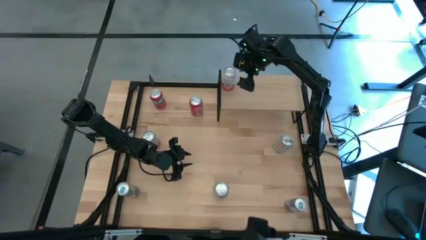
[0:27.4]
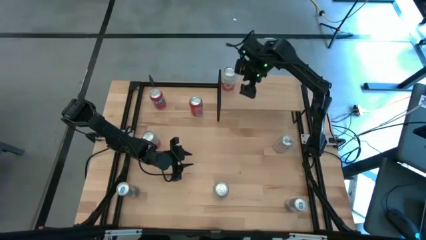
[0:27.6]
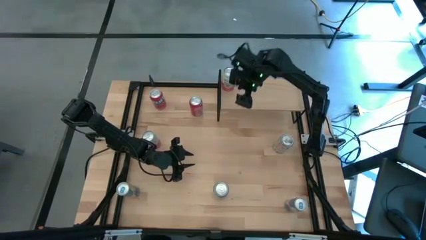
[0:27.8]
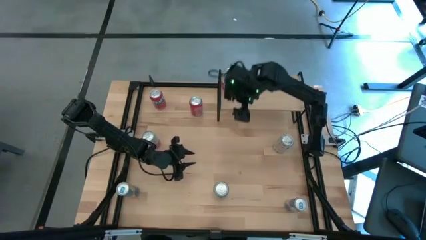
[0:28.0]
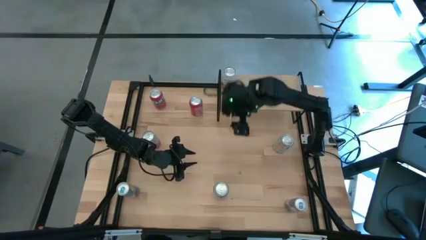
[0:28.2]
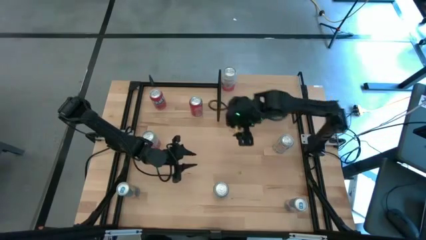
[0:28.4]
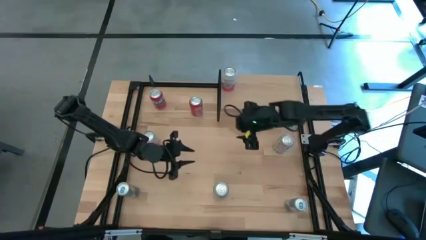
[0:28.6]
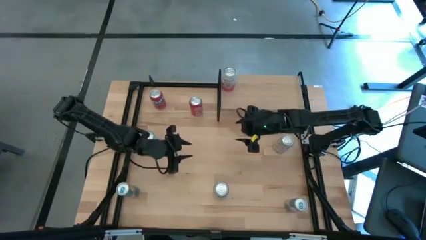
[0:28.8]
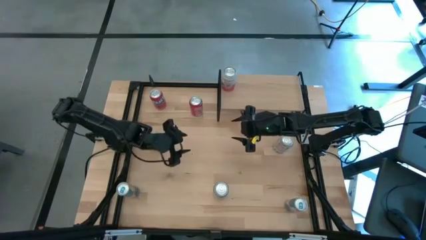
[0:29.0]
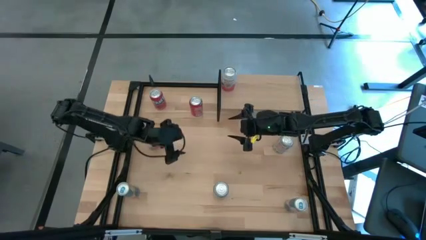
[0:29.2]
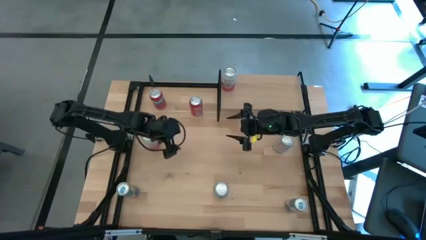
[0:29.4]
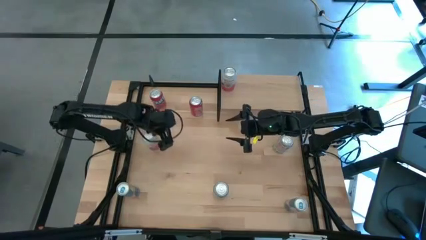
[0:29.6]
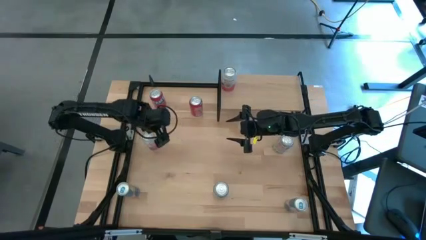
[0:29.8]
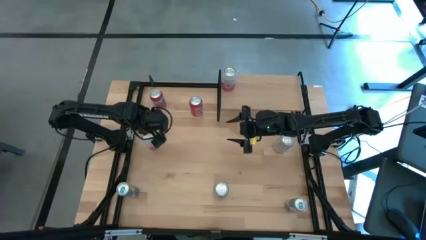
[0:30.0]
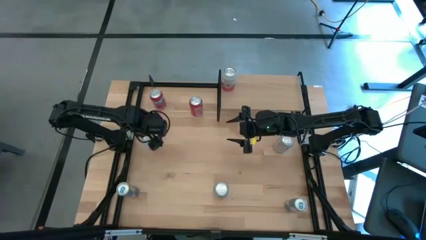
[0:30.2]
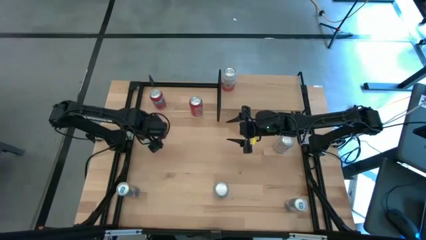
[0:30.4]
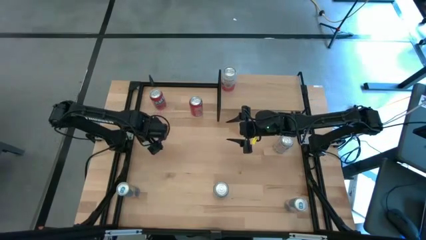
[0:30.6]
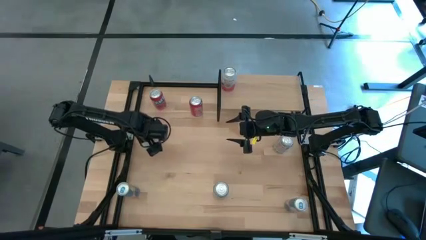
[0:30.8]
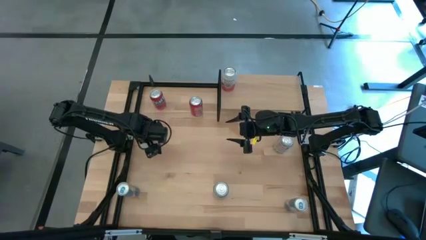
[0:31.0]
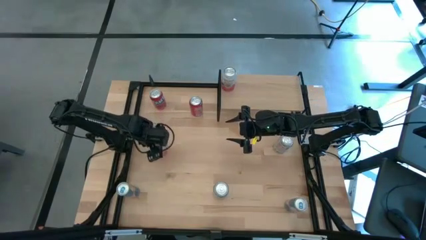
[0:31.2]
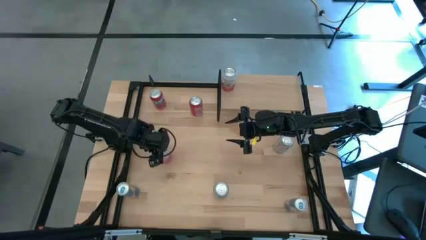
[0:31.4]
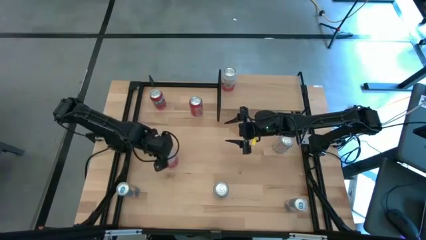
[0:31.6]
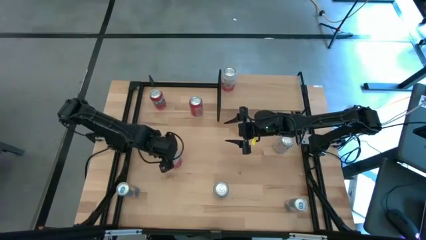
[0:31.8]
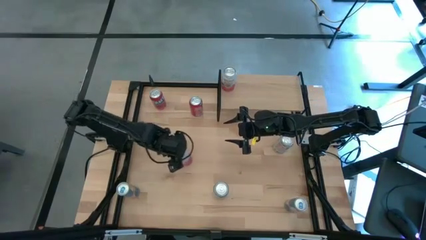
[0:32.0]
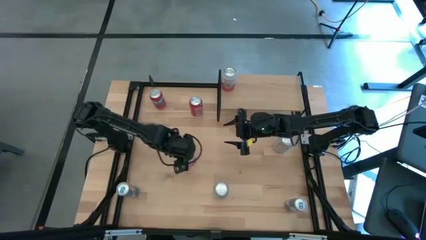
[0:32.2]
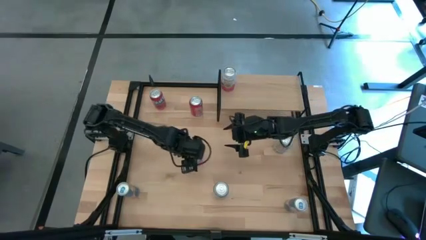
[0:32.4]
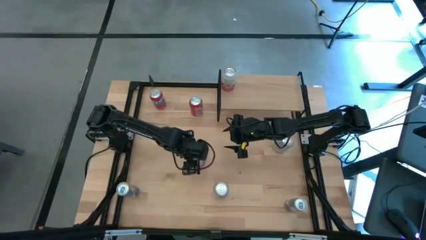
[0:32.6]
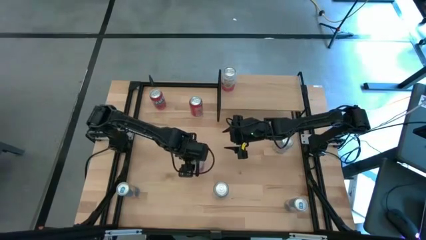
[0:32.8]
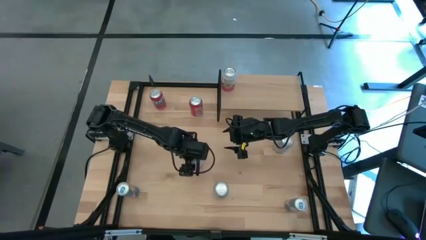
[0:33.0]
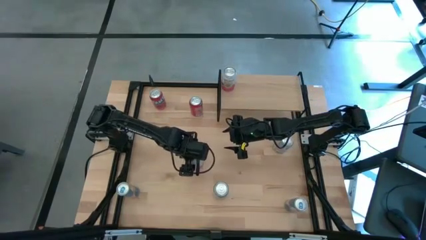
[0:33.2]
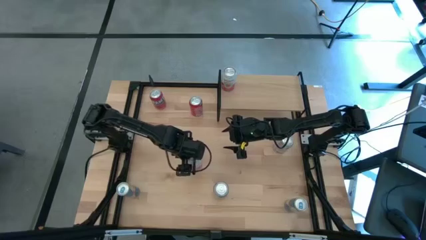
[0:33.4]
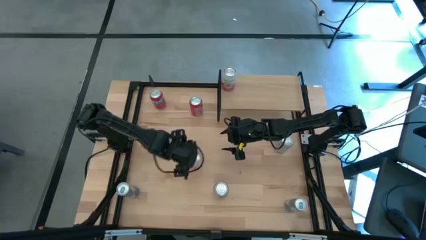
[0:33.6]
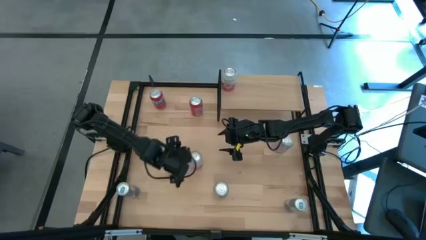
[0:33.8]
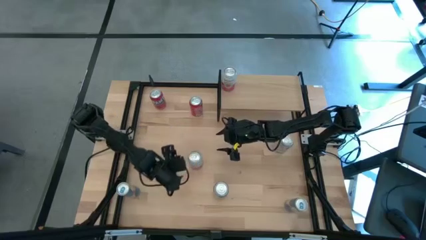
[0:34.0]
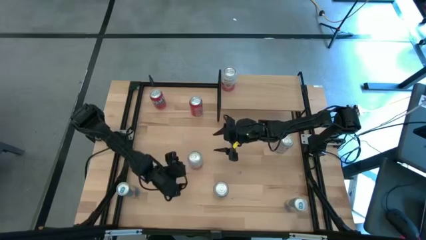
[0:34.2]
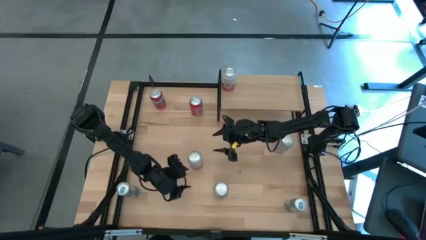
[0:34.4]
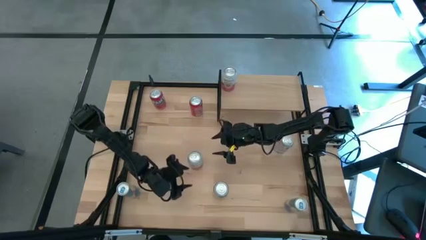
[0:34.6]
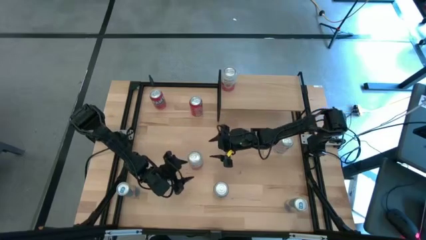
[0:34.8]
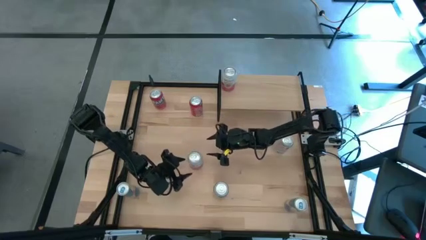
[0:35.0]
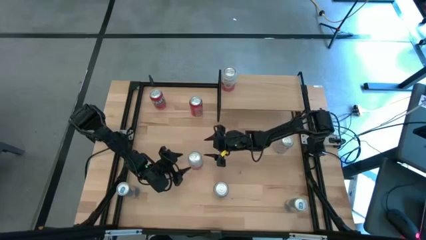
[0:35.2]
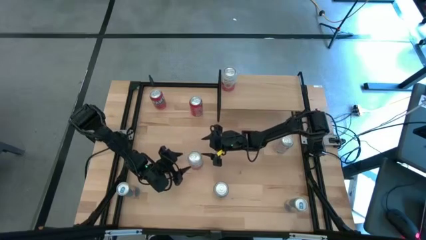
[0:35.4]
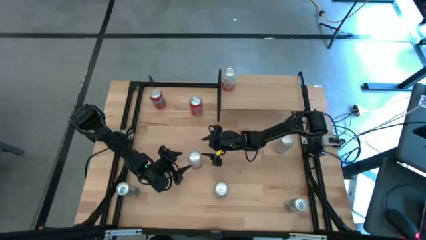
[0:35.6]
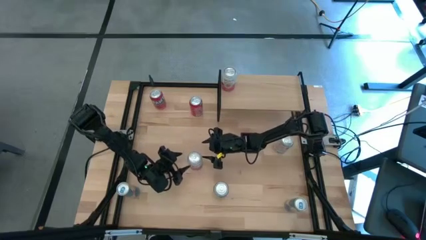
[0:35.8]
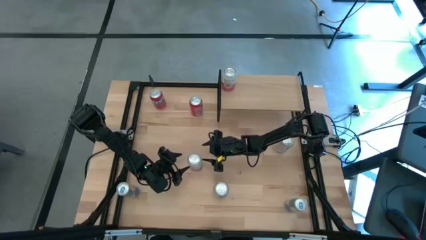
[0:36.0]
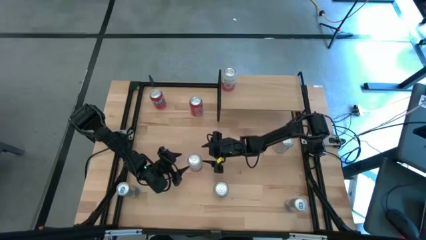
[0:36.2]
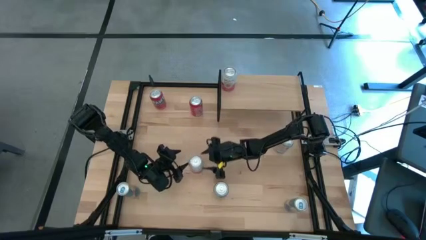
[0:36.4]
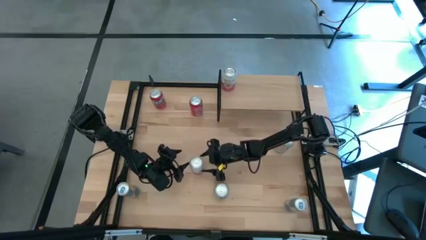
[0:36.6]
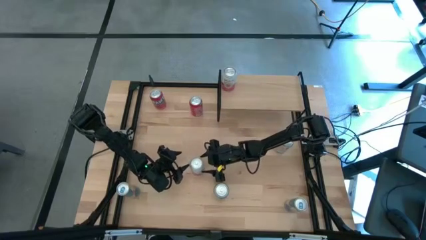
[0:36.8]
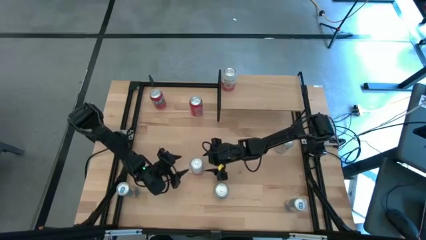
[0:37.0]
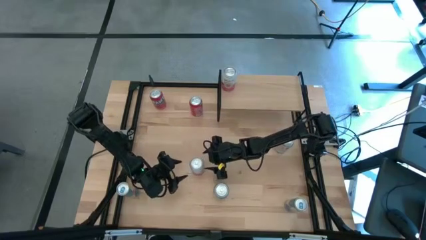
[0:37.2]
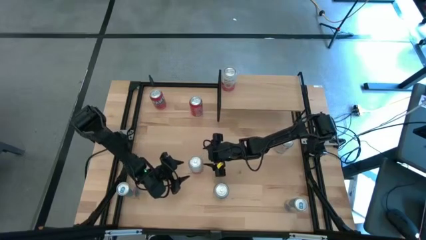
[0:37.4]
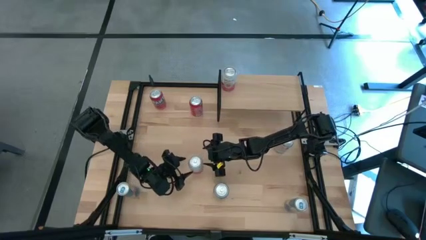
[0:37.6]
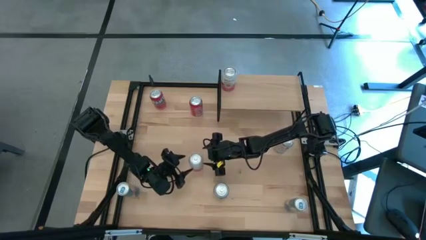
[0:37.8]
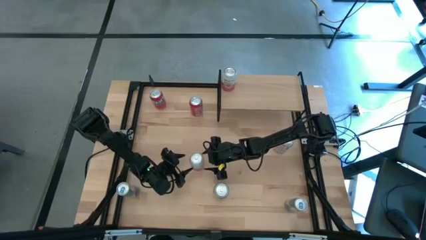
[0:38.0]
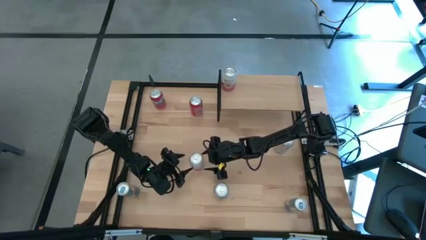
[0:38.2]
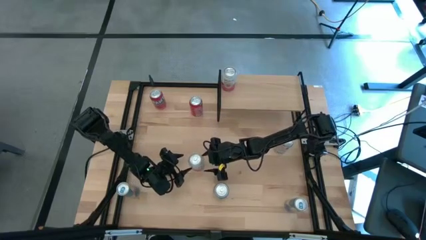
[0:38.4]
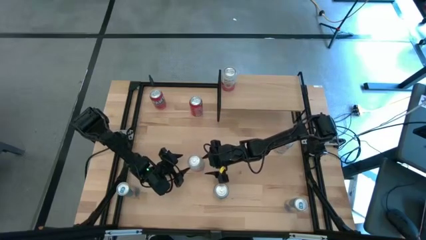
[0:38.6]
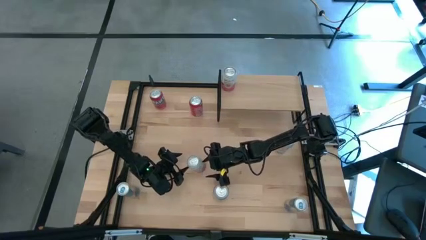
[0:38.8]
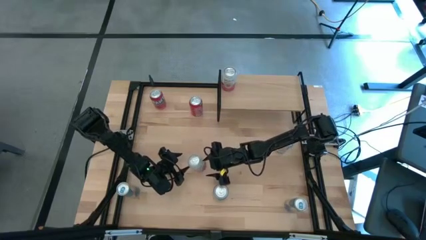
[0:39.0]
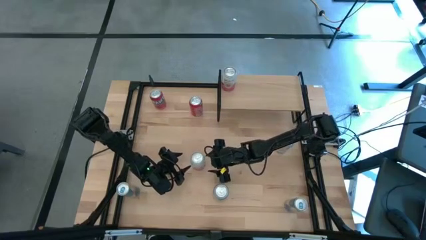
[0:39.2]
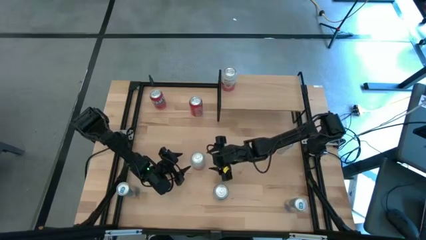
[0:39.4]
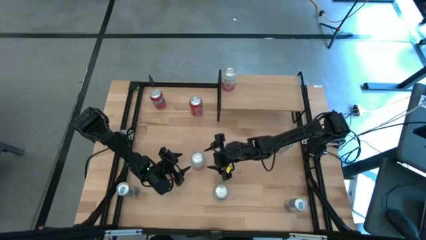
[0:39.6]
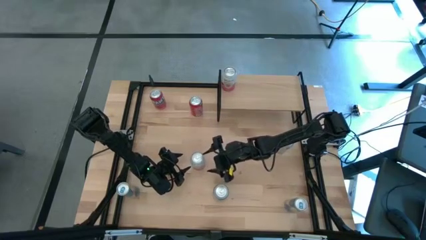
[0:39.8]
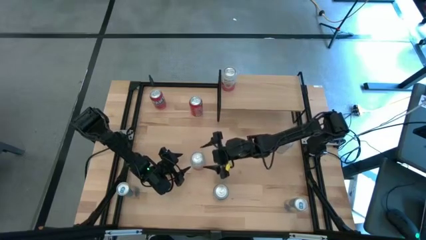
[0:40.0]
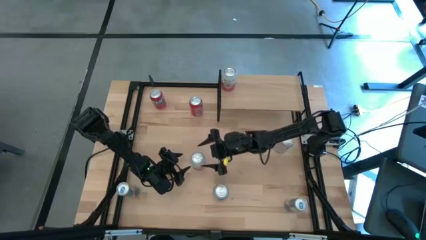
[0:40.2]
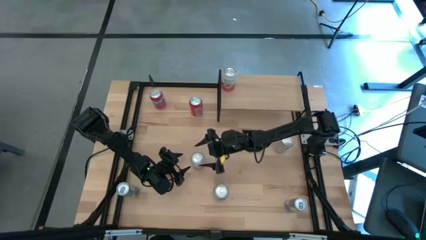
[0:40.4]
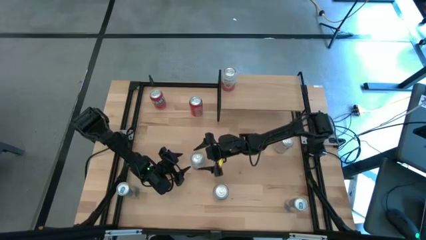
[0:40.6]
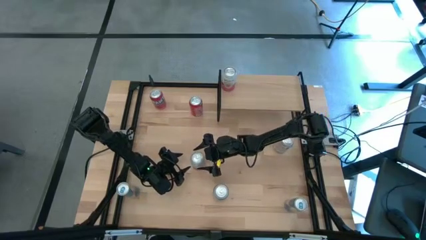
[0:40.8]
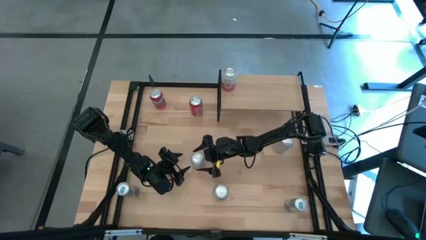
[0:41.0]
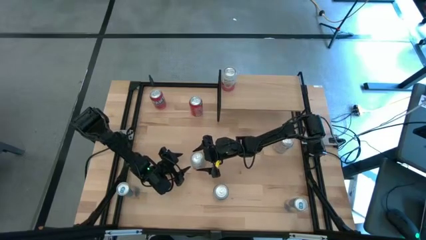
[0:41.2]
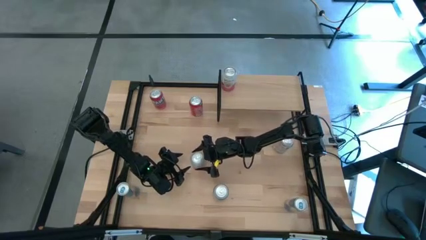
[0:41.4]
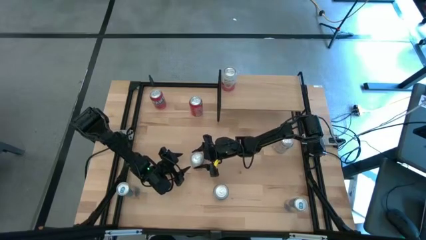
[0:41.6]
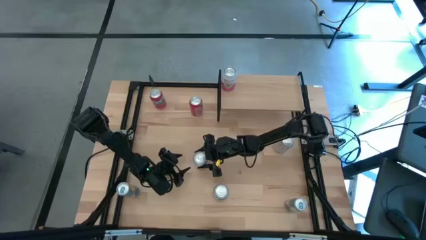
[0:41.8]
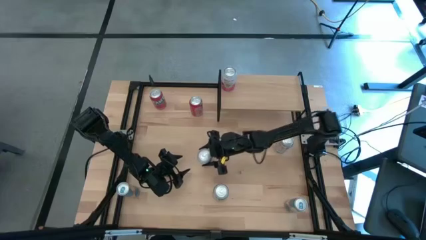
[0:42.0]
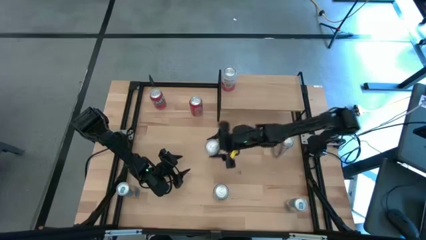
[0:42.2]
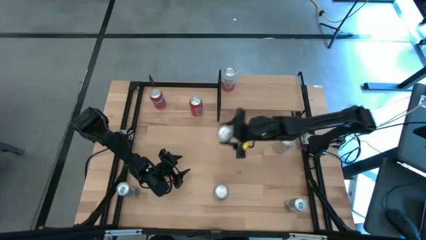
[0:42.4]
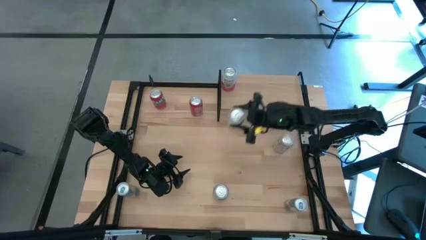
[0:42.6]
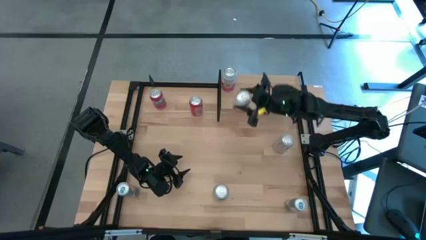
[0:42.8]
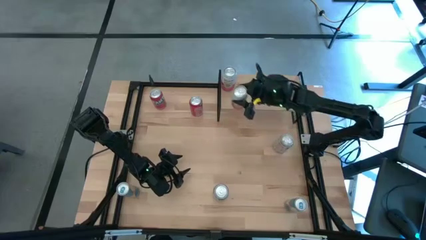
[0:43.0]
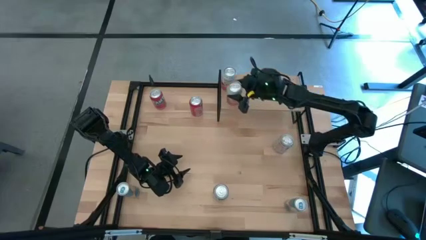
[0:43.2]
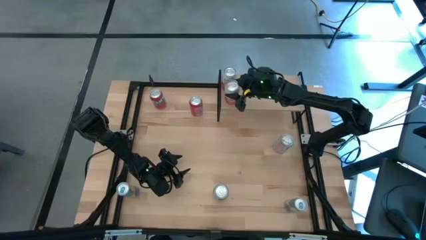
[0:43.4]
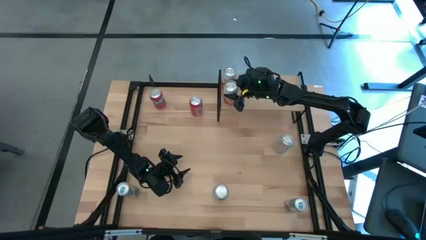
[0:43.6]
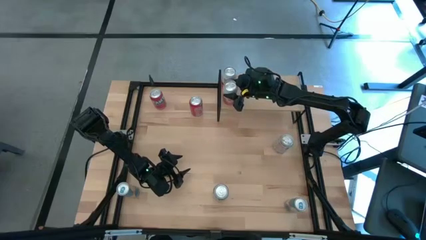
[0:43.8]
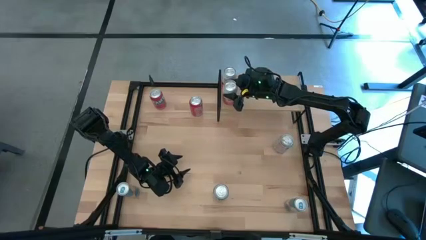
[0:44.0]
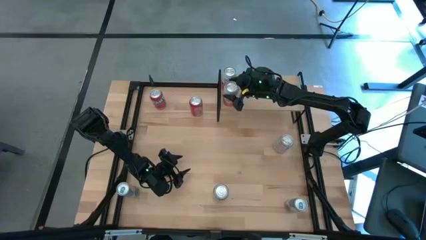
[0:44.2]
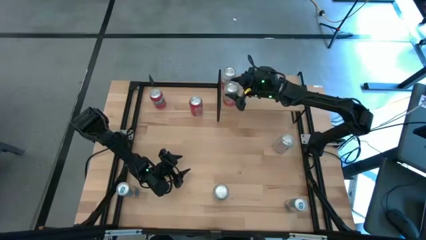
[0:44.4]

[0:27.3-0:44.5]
Task: Place canned beverage on shelf
Put the pink soda can on the shelf aligned with the other pink soda can
